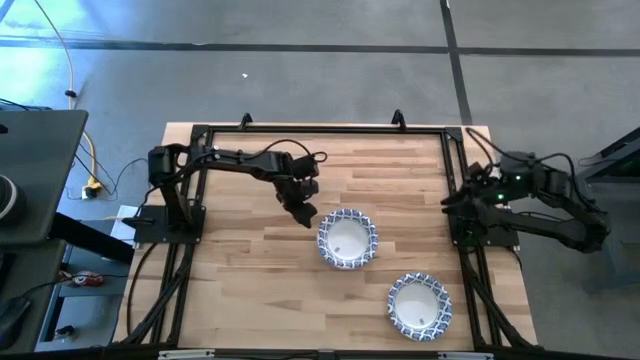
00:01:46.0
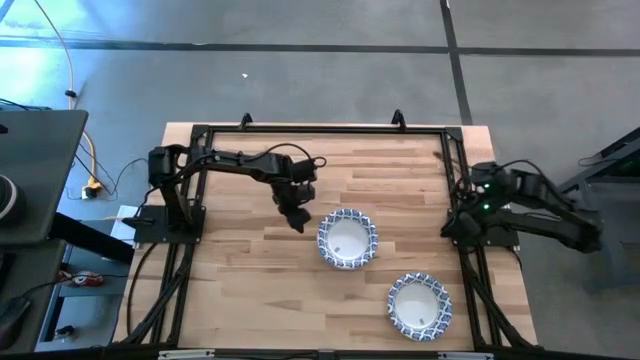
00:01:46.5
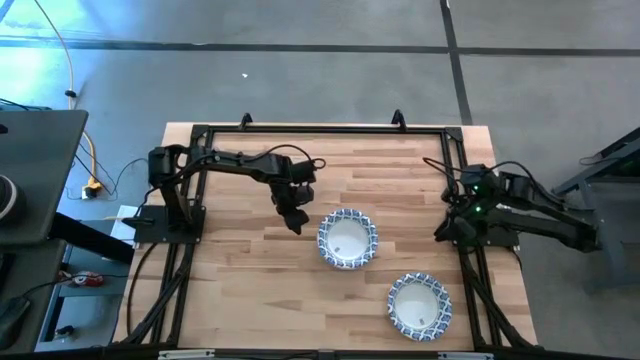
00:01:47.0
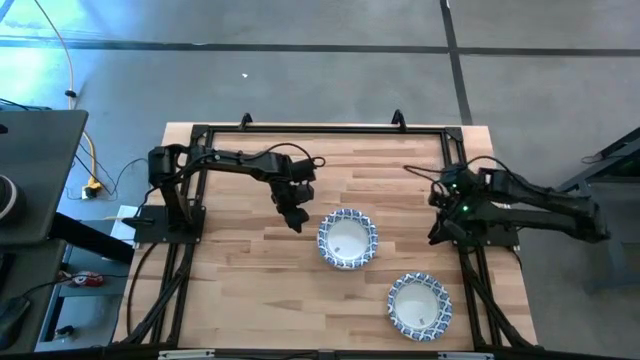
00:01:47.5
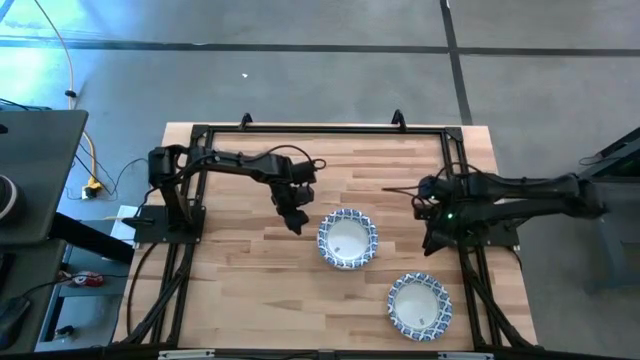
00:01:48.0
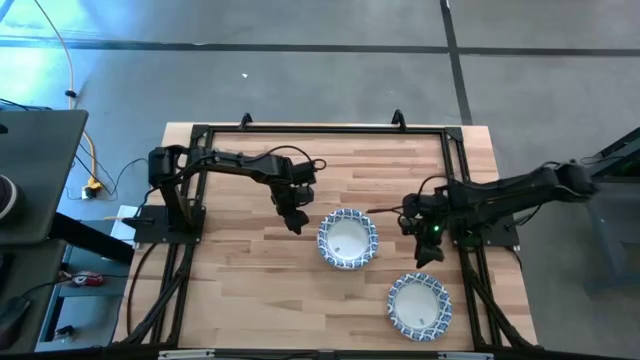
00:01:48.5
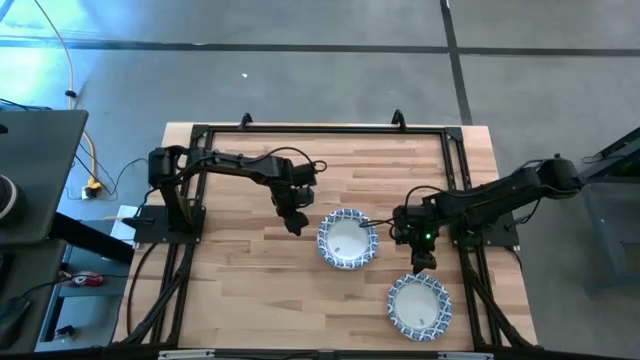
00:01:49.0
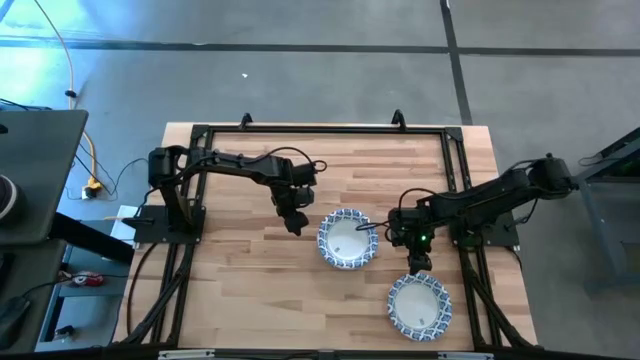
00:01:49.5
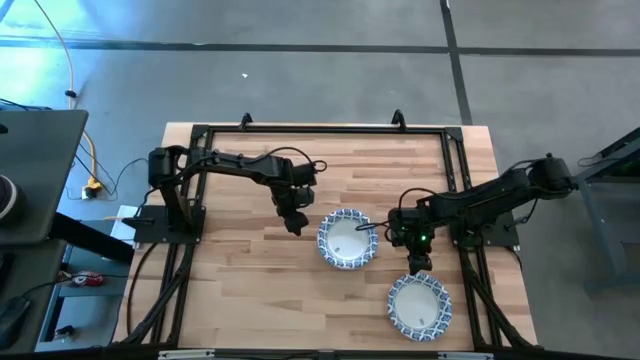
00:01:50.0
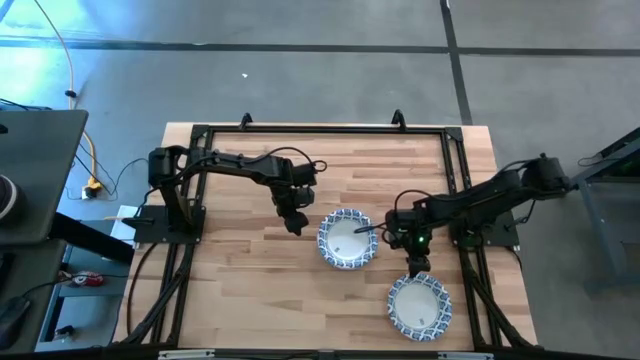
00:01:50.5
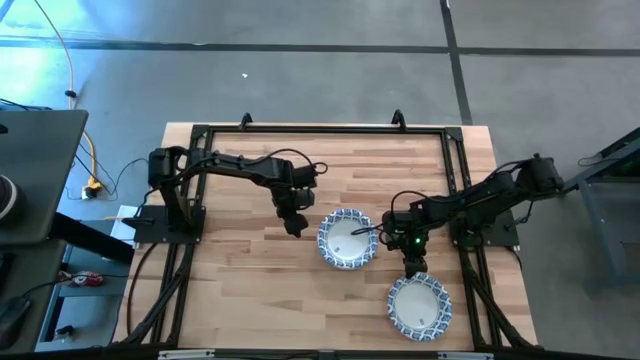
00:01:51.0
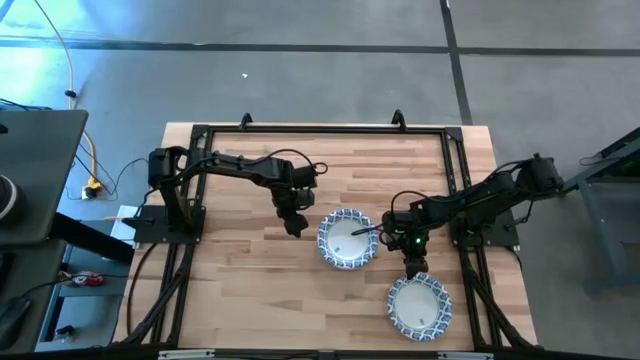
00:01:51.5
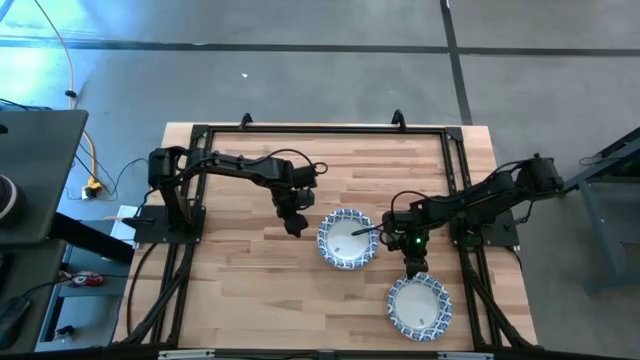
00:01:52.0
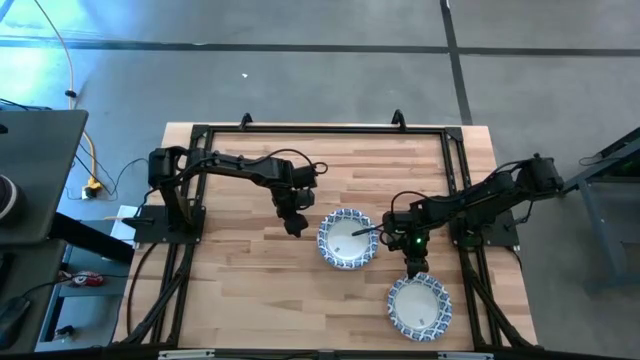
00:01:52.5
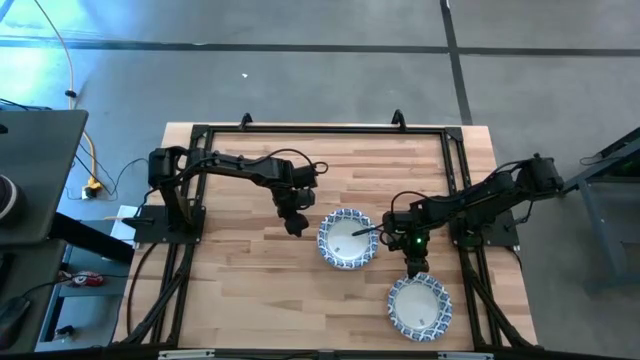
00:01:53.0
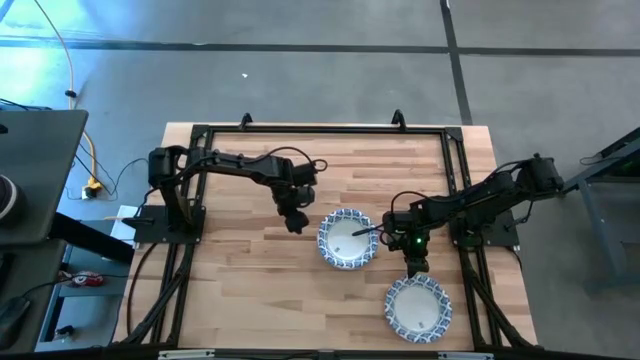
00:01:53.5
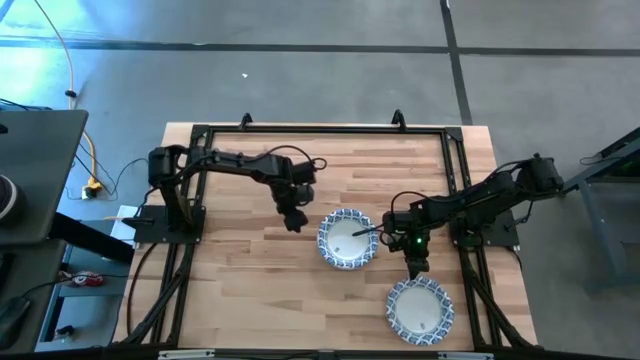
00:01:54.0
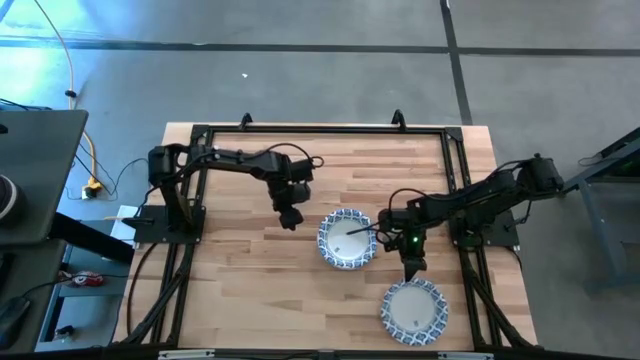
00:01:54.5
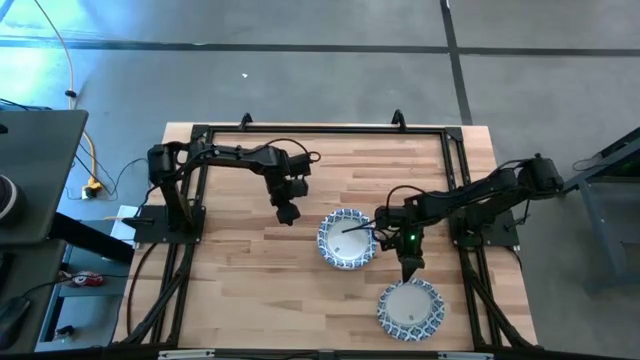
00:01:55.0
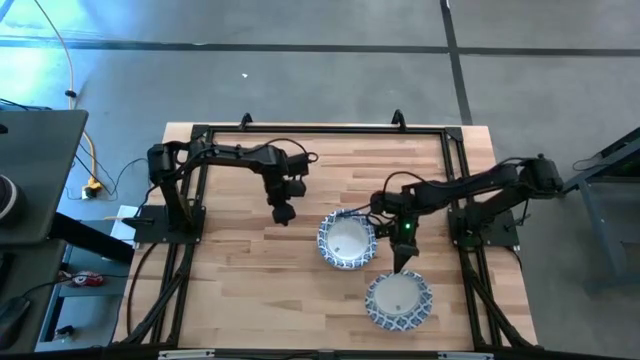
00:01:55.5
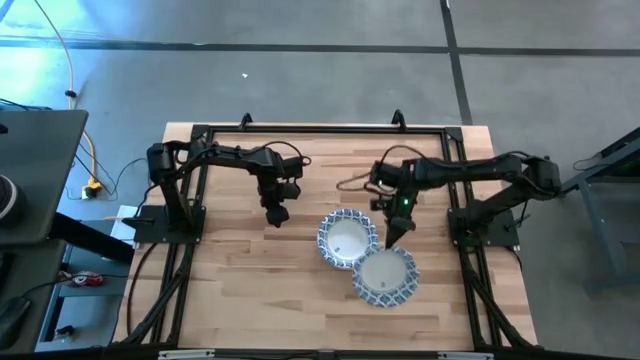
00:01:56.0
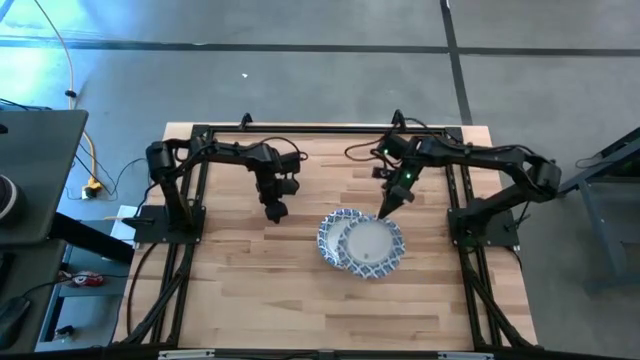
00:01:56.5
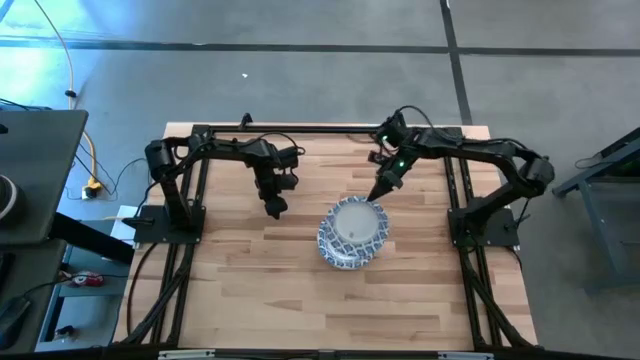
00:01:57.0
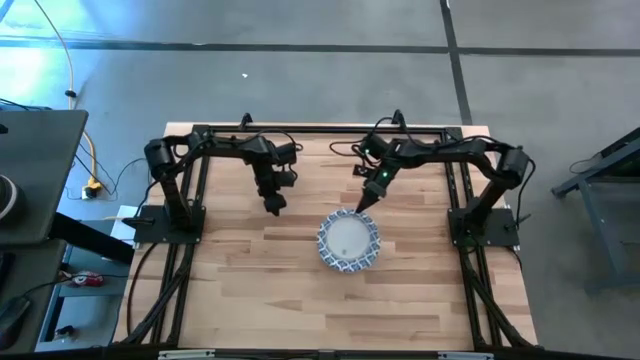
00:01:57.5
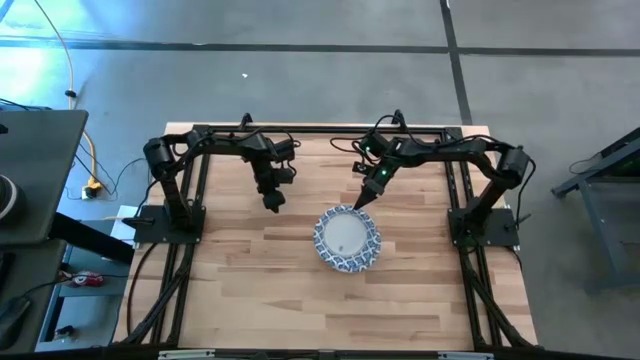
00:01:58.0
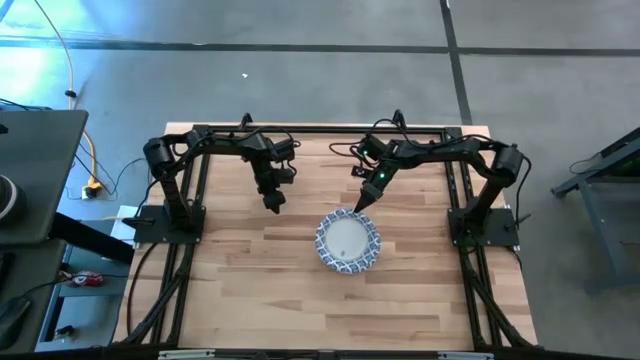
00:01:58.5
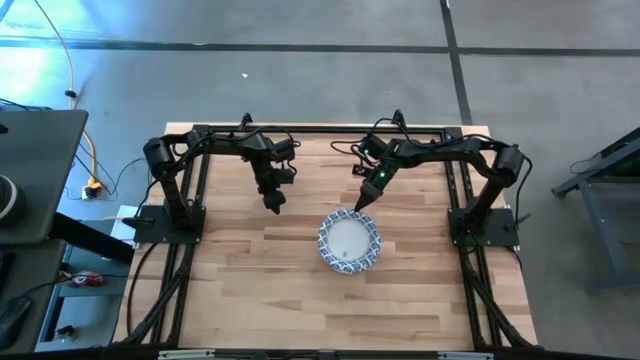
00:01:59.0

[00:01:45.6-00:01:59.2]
Task: Nest bowls inside each other
Stack the white patterned bowl on top of the other white patterned bowls

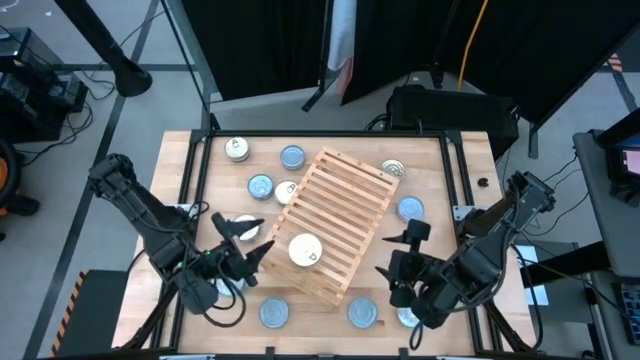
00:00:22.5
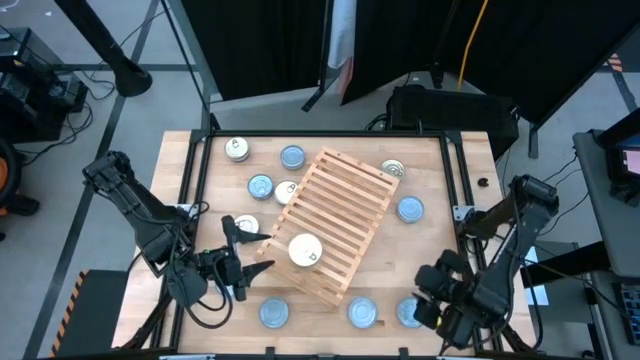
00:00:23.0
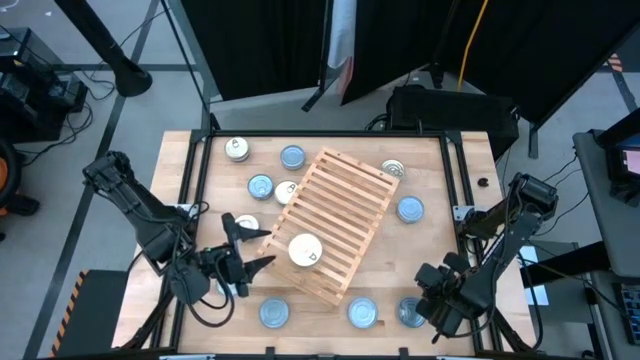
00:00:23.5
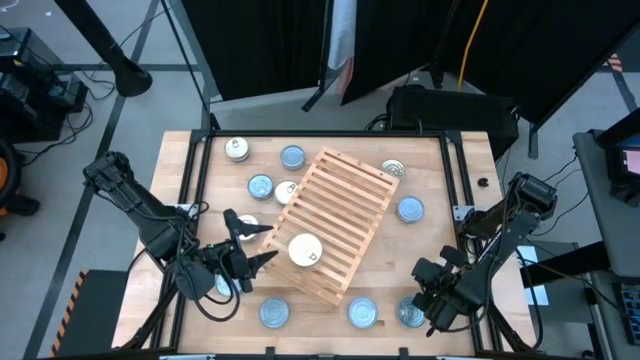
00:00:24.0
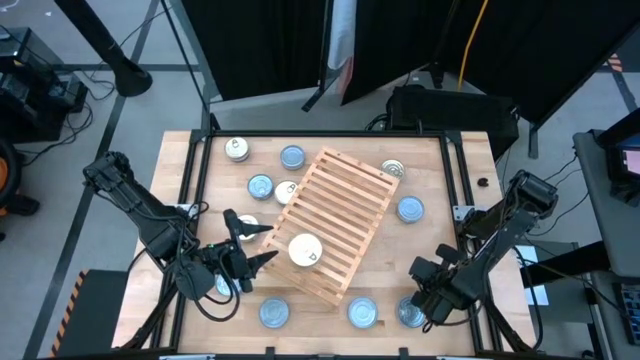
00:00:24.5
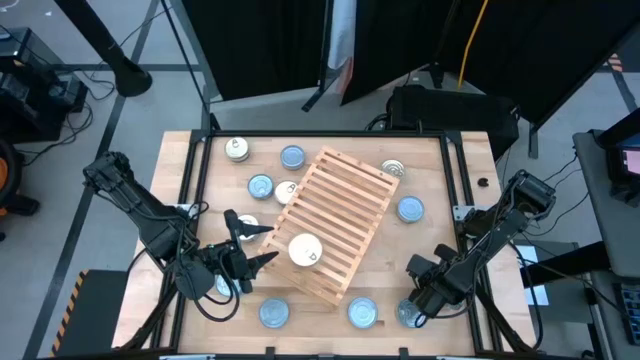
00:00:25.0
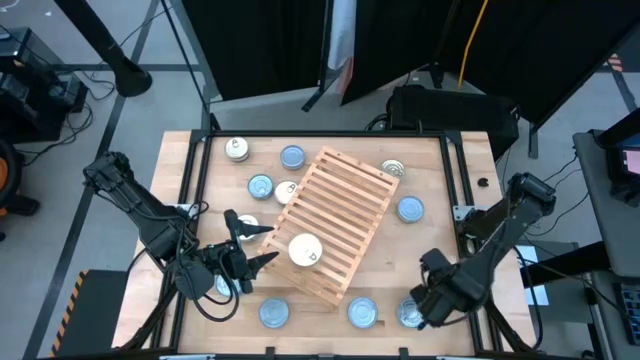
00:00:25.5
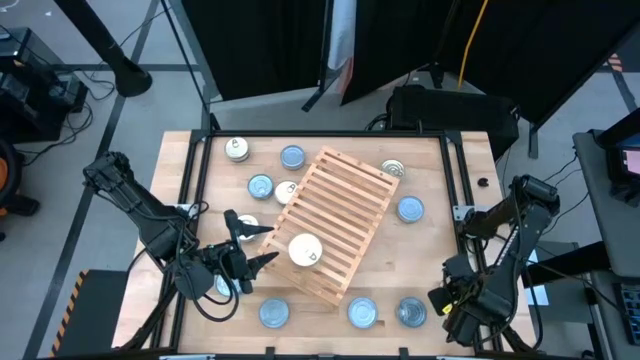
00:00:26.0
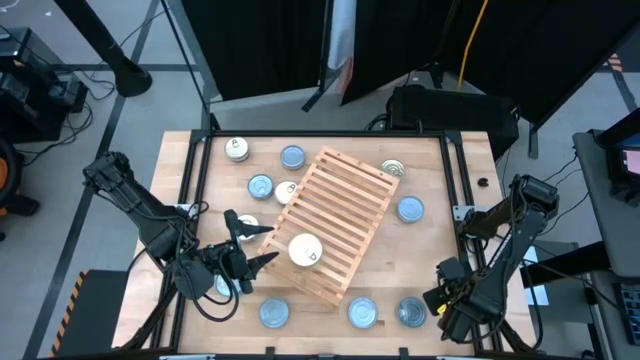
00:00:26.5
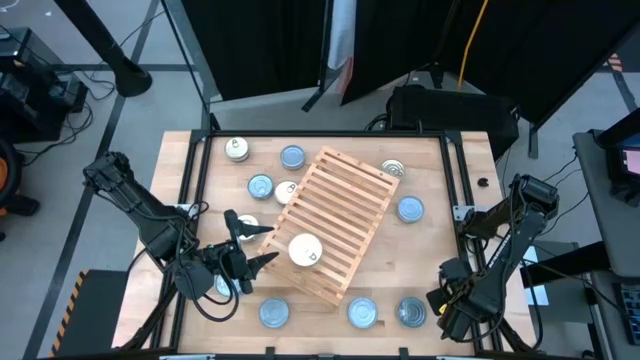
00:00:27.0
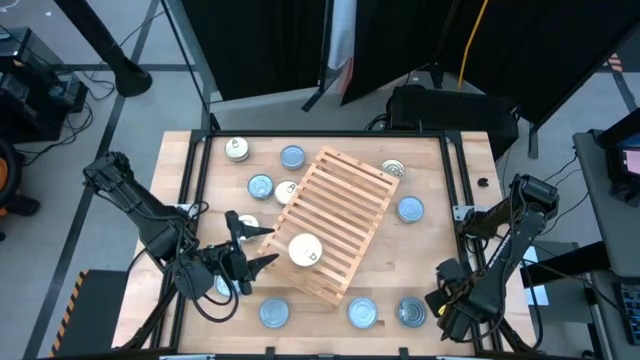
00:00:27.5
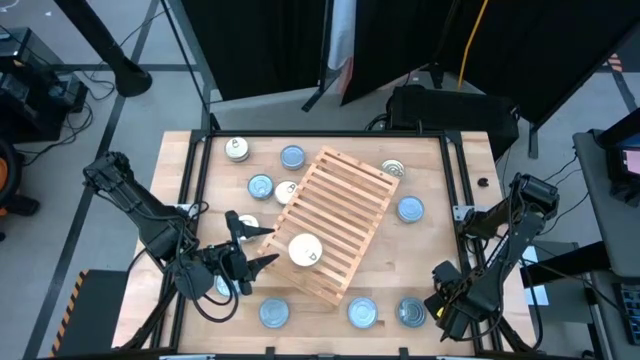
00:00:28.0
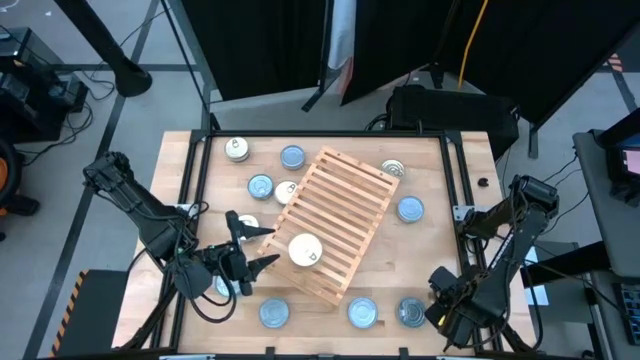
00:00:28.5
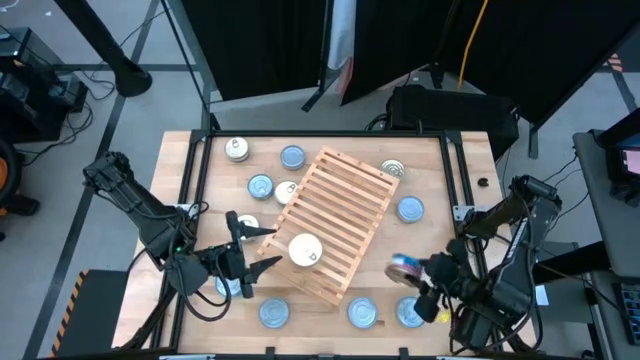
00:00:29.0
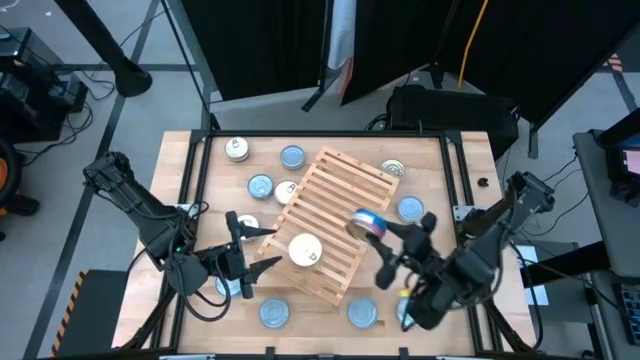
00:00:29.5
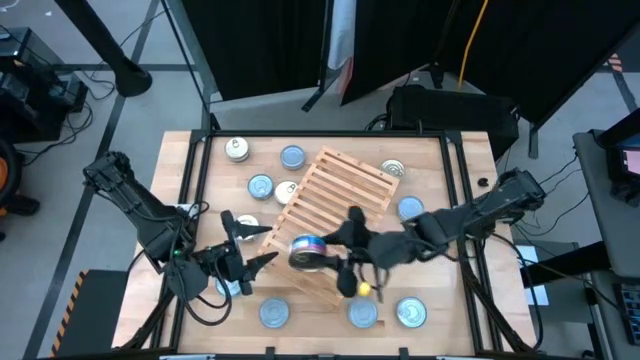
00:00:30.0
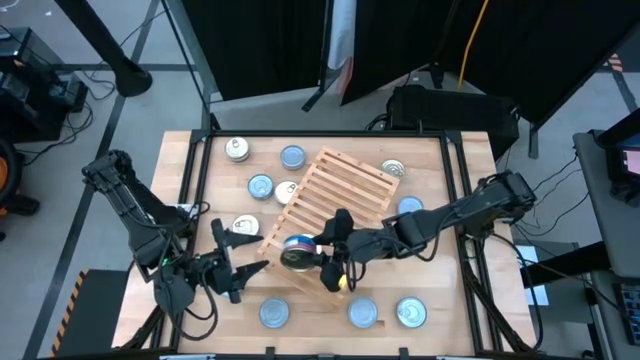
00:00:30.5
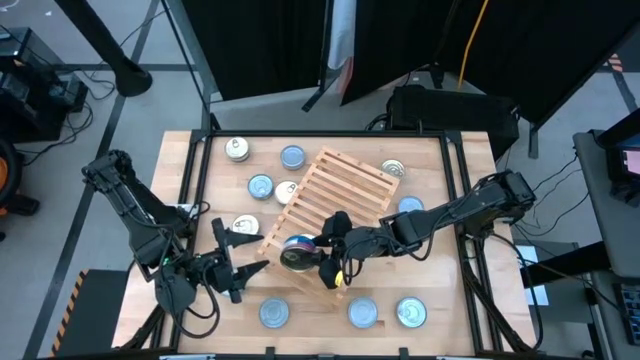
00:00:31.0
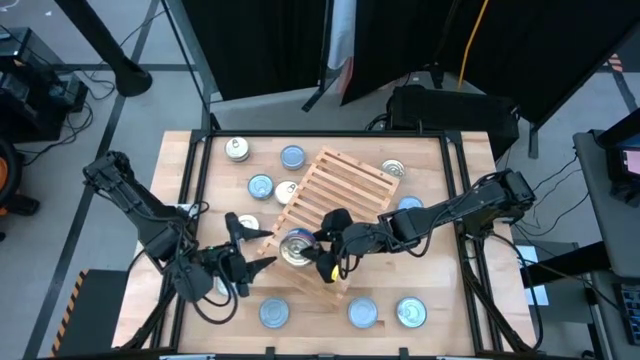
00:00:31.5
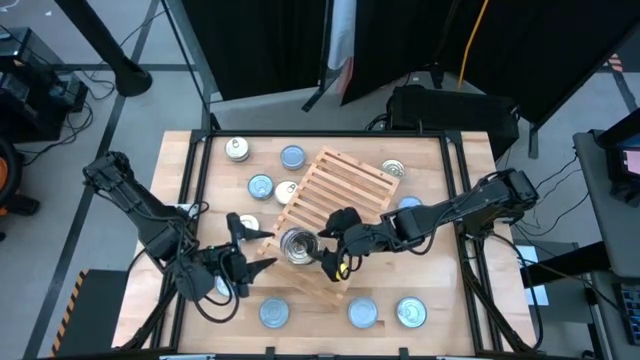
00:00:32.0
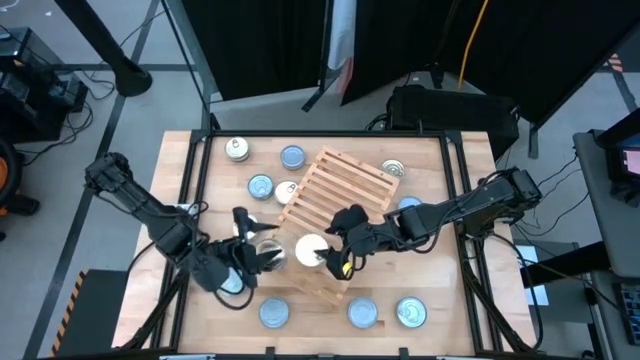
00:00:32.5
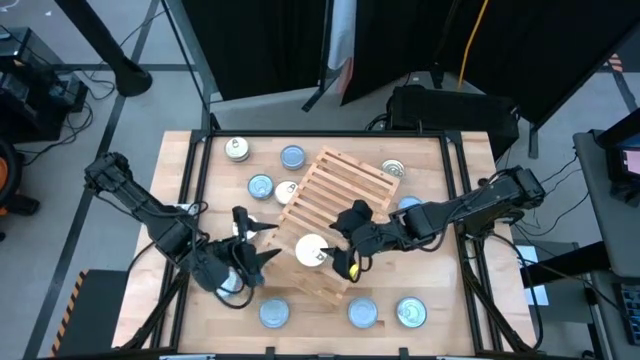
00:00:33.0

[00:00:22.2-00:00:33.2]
Task: Stack canned seafood by type on shelf
Stack the blue-pink tuna can on top of the other blue-pink tuna can on the shelf
